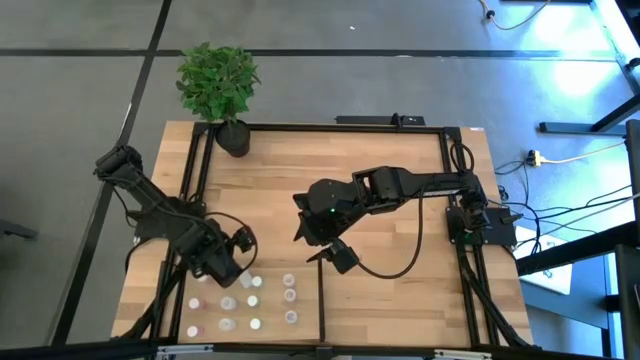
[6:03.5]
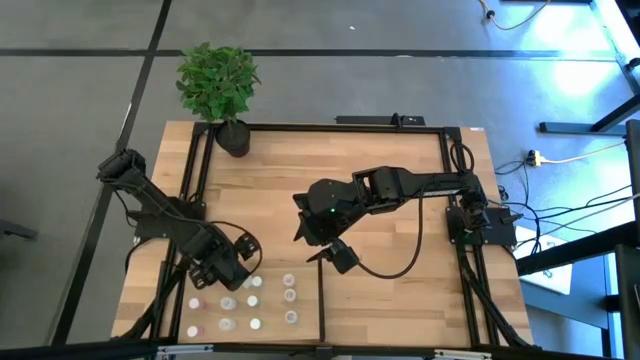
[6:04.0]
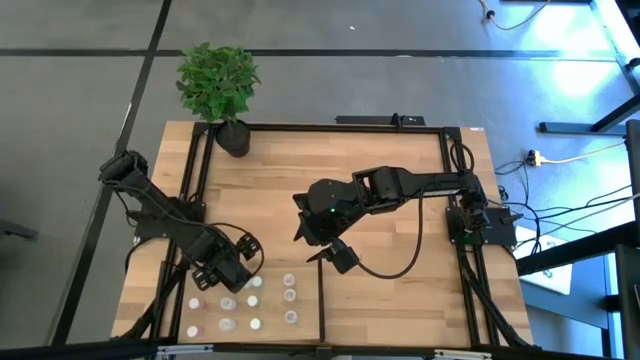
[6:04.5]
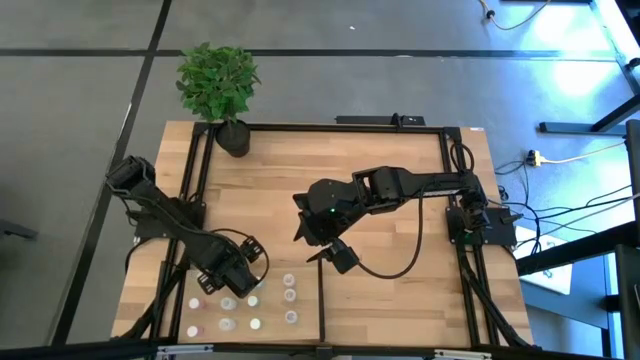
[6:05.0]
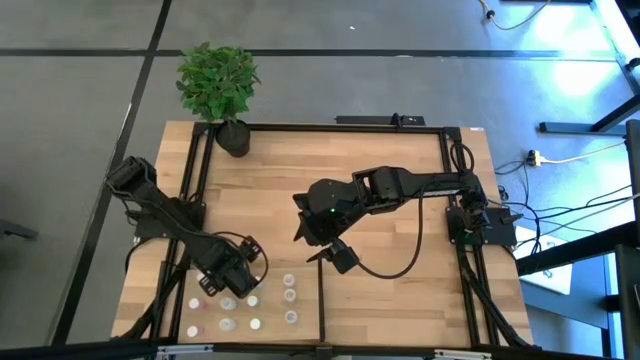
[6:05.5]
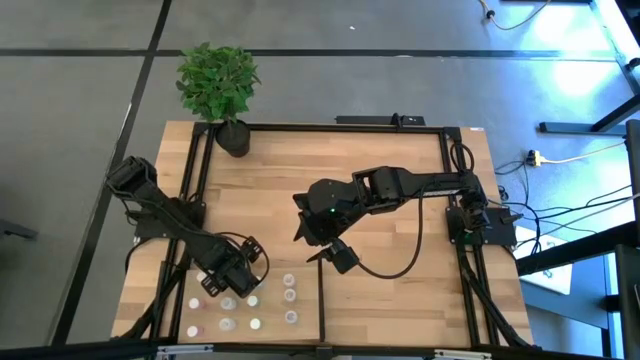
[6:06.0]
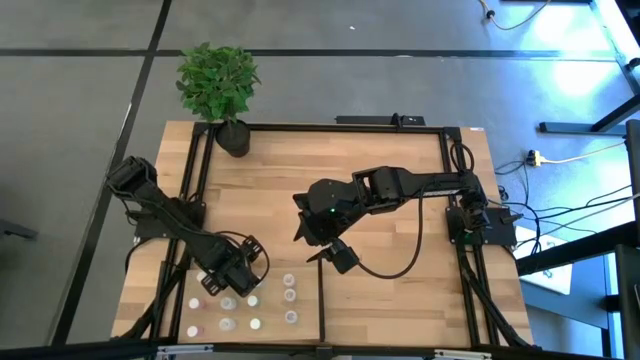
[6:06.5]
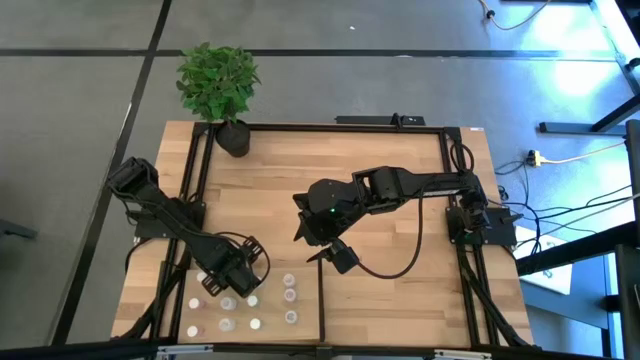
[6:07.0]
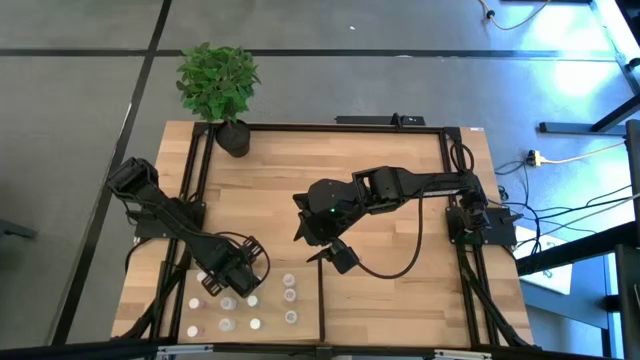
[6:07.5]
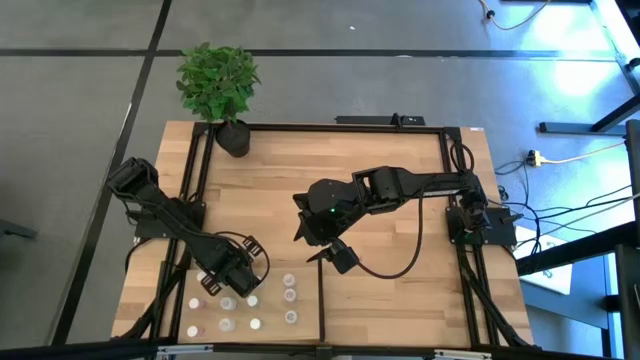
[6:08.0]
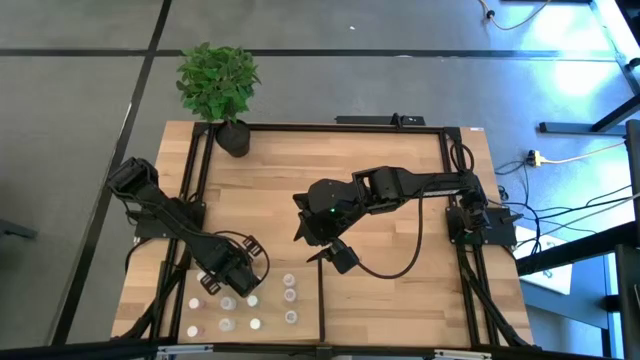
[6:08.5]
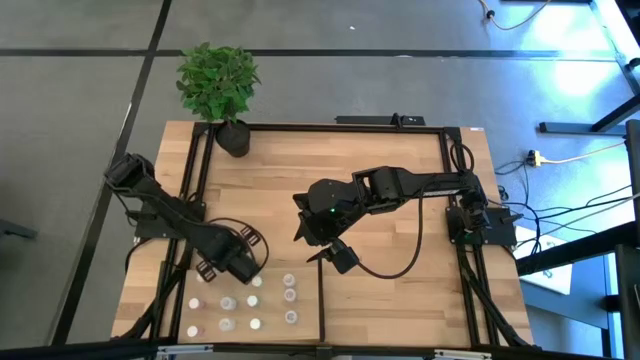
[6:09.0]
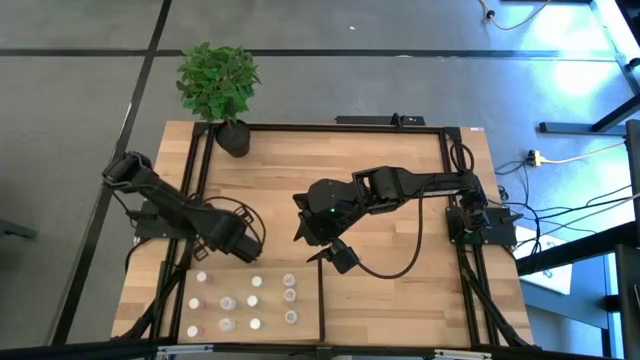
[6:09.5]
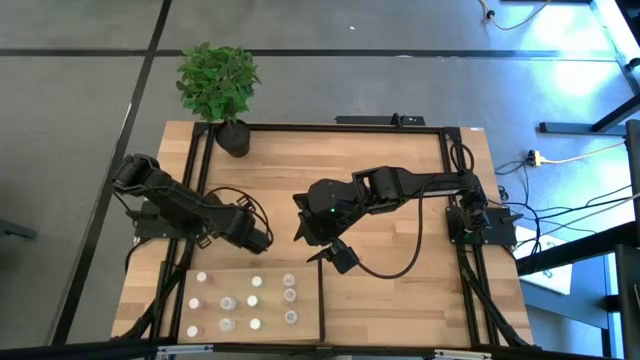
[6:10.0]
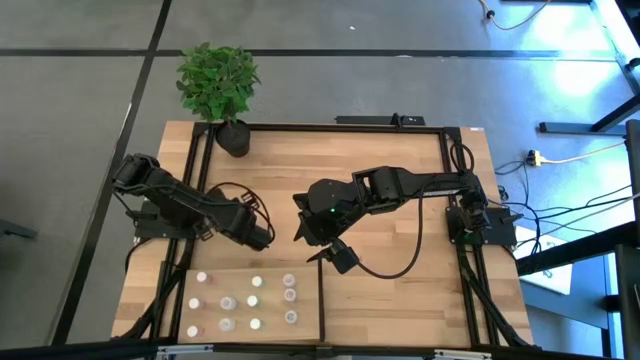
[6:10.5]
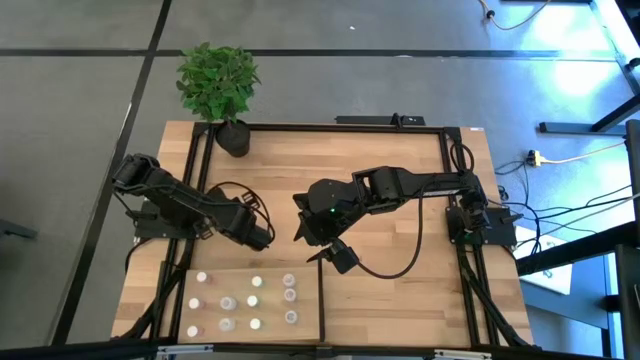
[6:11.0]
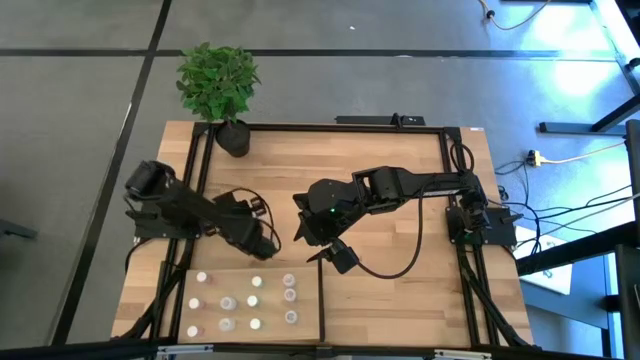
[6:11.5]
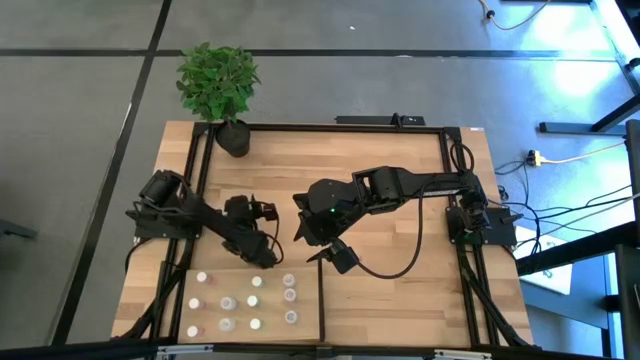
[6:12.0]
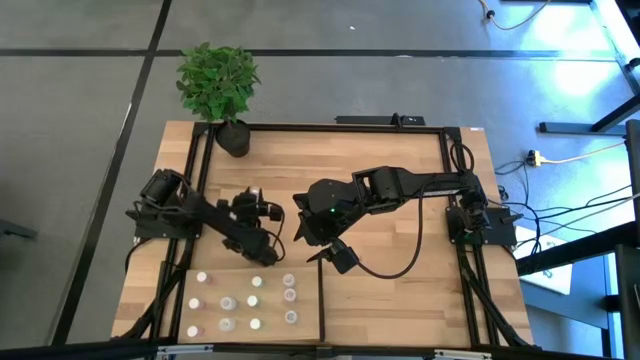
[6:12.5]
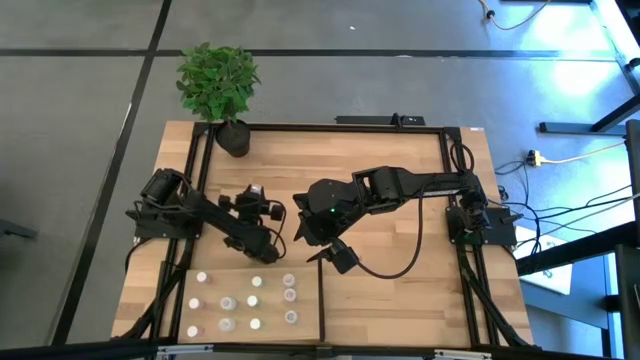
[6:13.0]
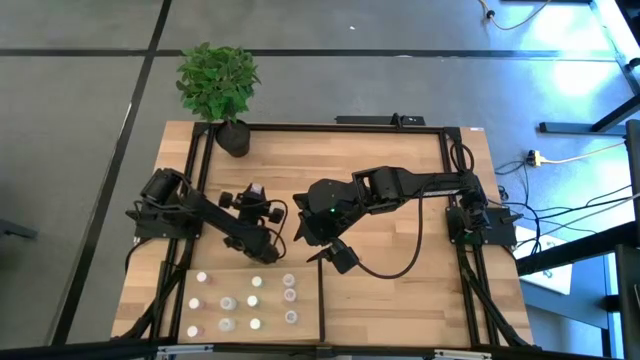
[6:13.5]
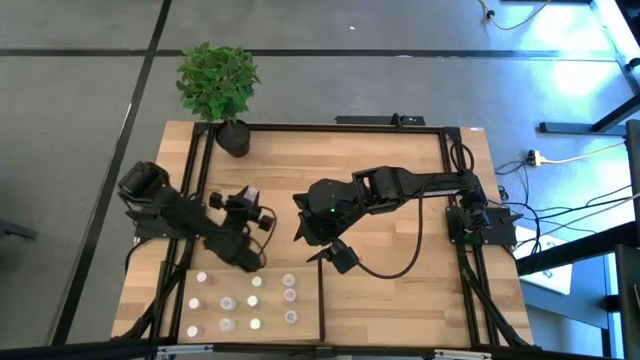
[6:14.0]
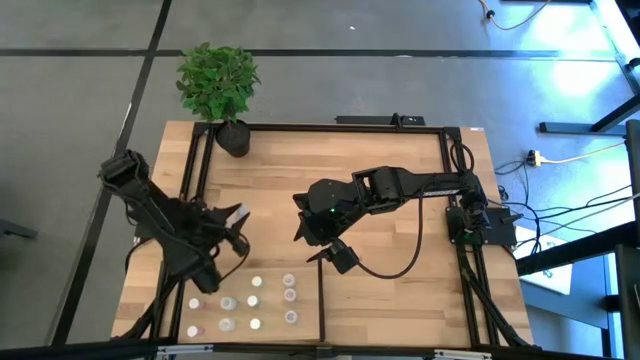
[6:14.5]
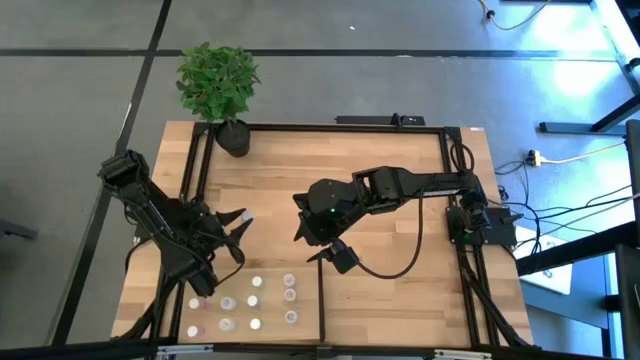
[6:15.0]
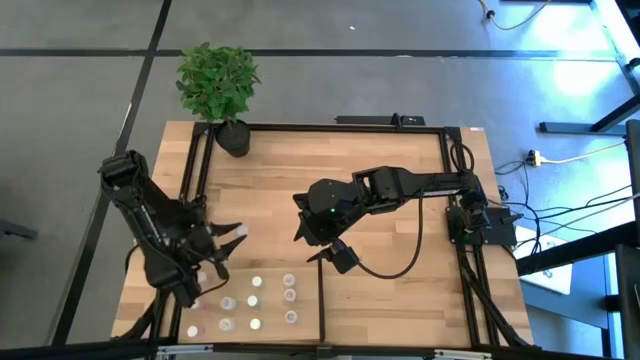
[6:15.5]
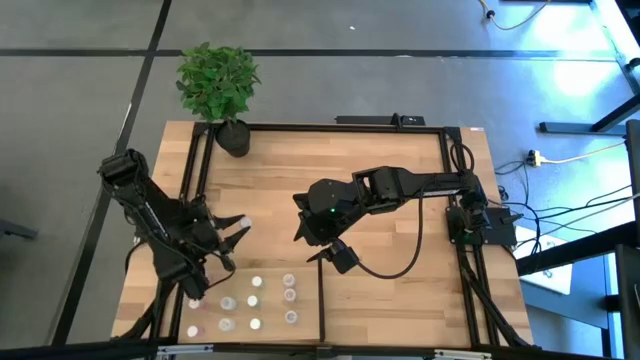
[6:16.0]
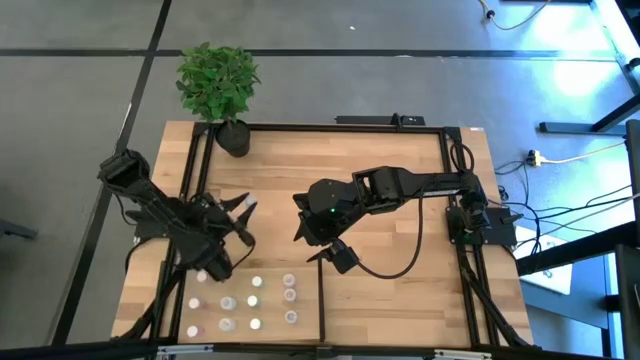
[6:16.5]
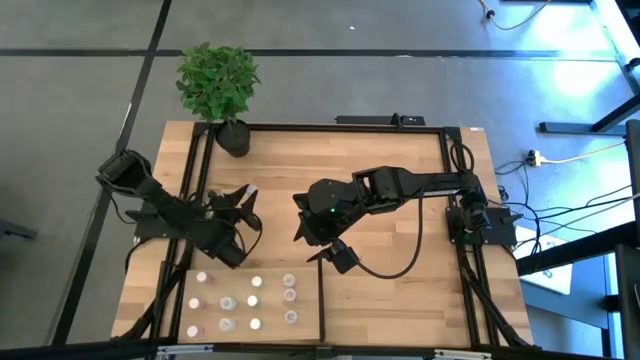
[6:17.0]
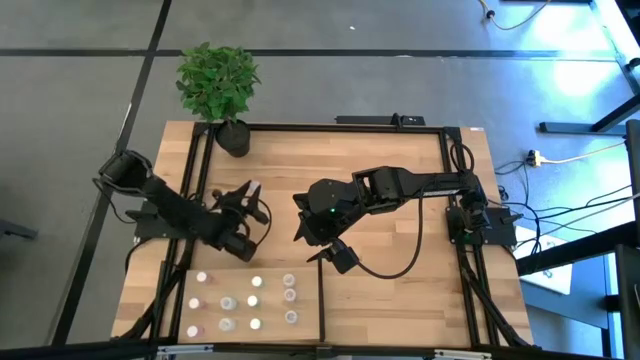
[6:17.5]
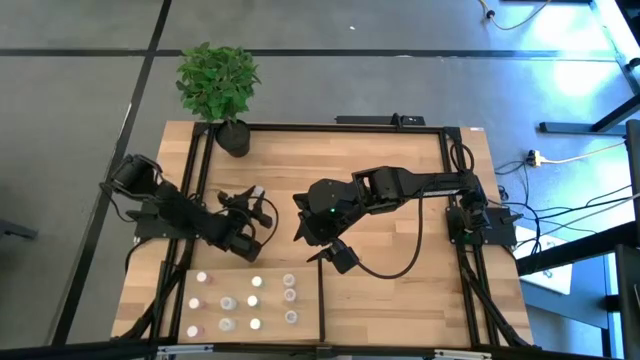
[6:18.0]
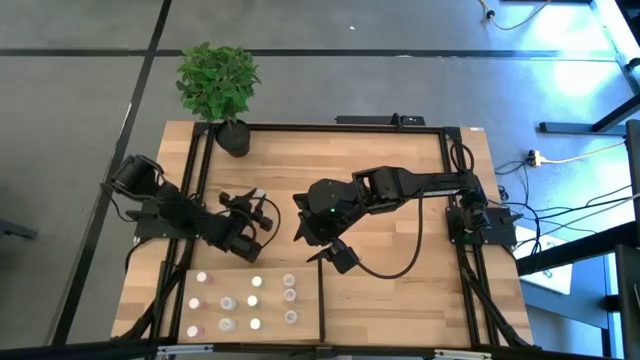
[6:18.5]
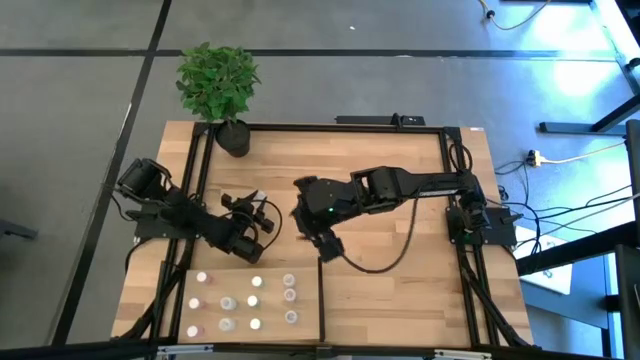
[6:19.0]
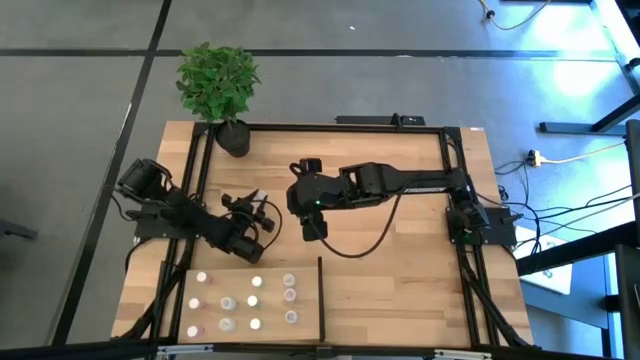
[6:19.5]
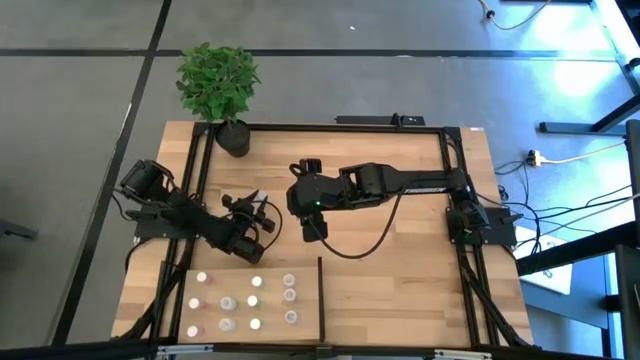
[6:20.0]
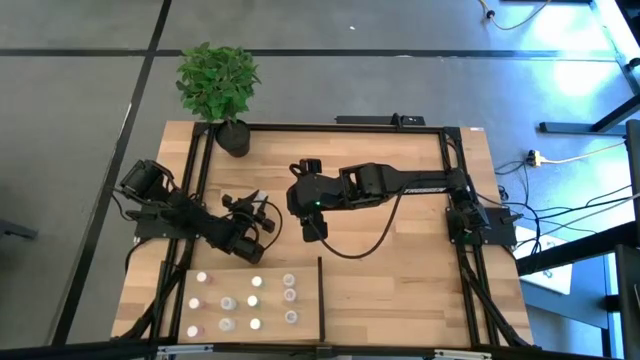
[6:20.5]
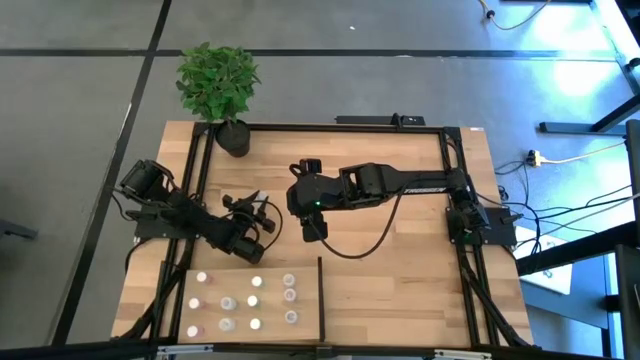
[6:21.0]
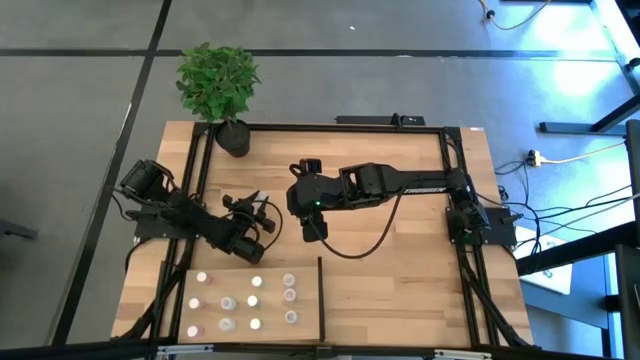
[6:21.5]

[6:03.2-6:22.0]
Task: Pick and place medicine bottles onto shelf by color
Put the white pill bottle on the shelf aligned with the other white pill bottles

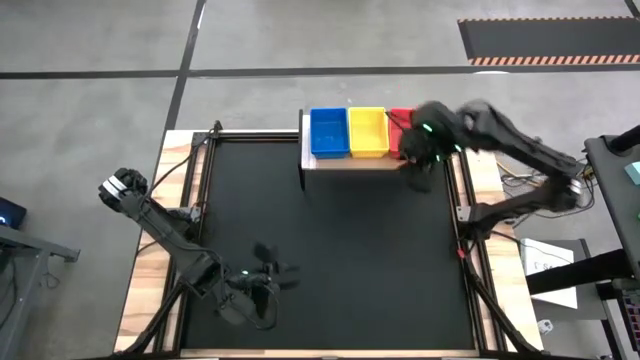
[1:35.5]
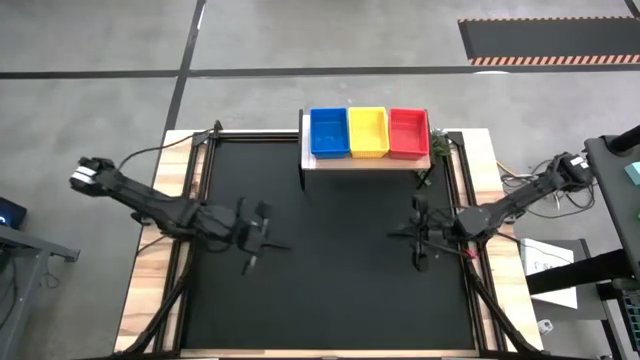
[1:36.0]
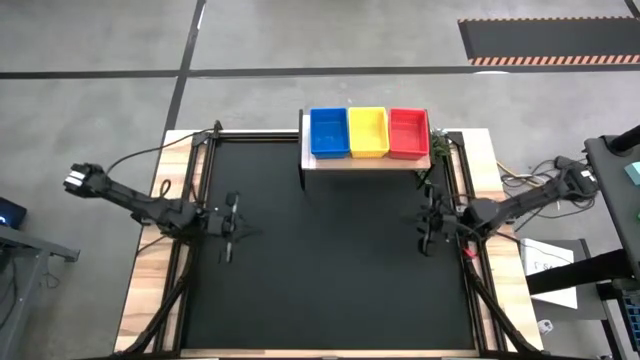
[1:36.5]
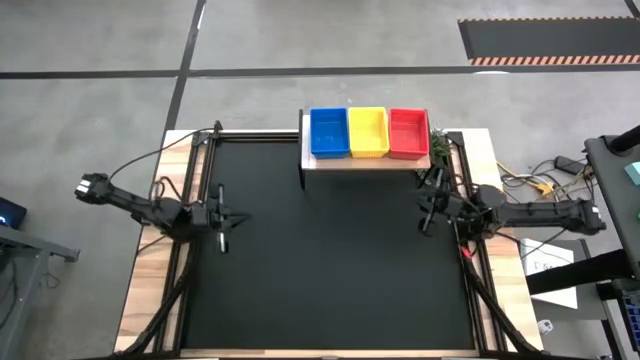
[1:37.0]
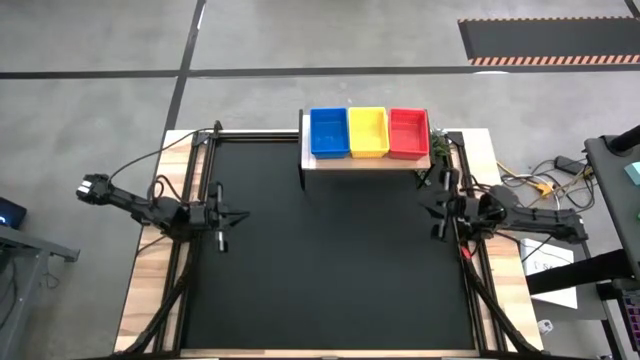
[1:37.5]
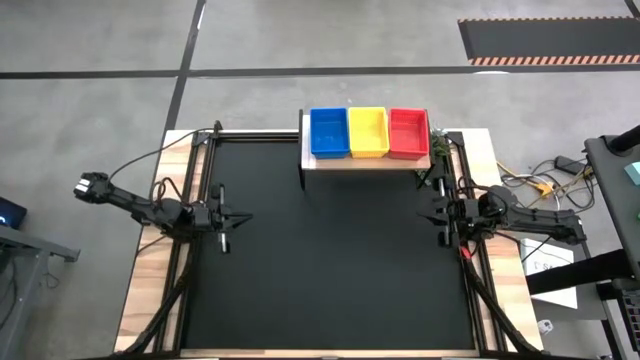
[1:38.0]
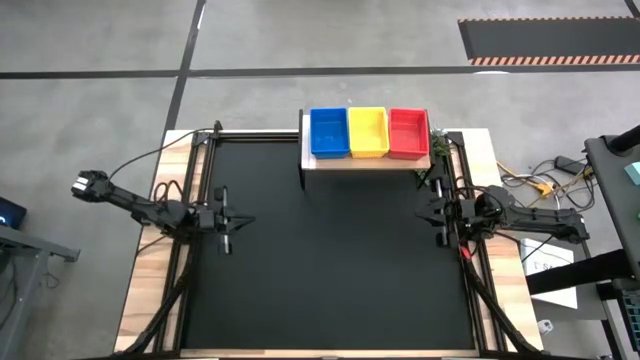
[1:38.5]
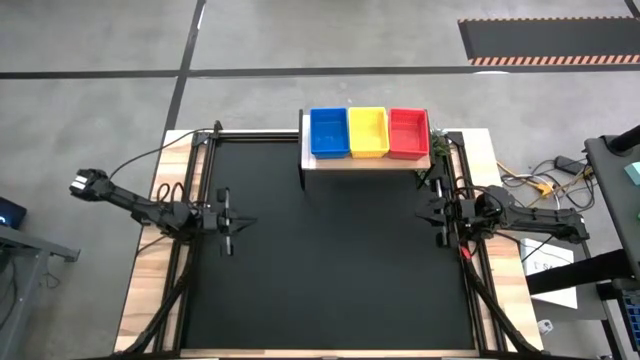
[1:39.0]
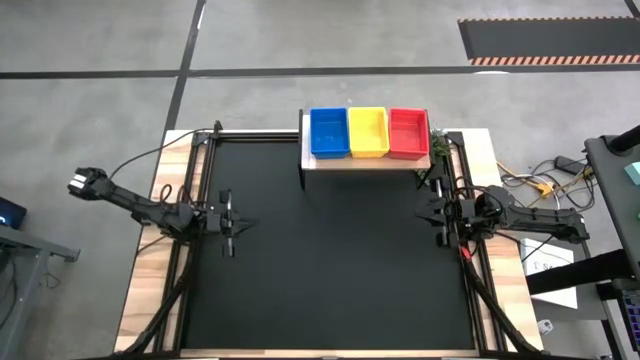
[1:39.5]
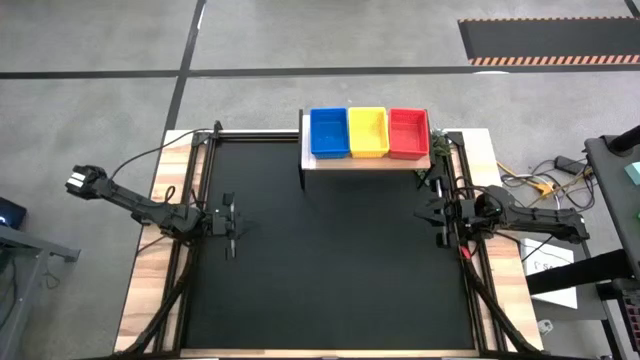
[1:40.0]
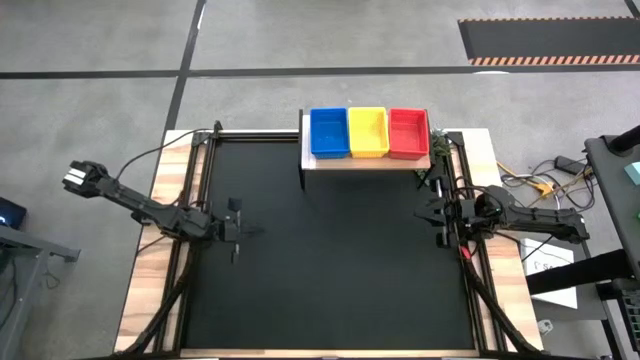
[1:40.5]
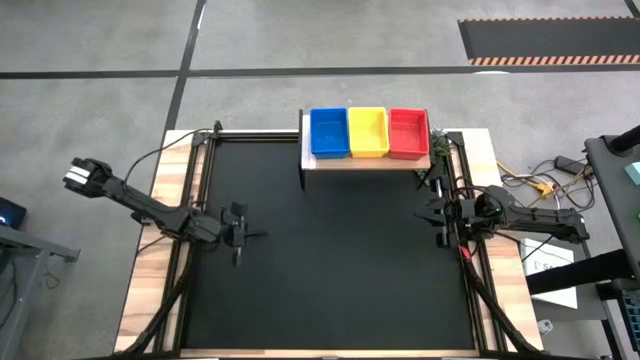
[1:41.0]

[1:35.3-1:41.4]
Task: Stack baskets on shelf by color
Return to Home Position
